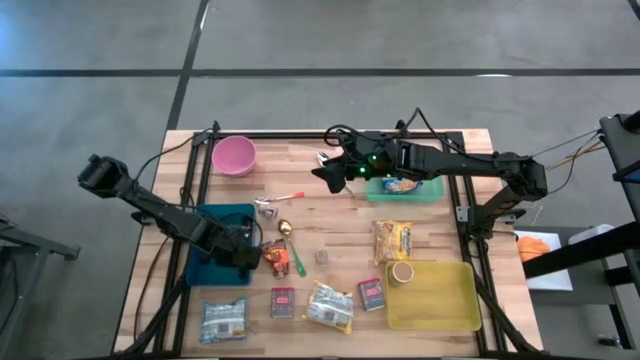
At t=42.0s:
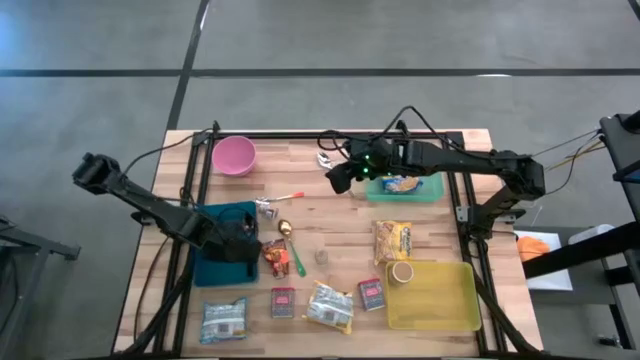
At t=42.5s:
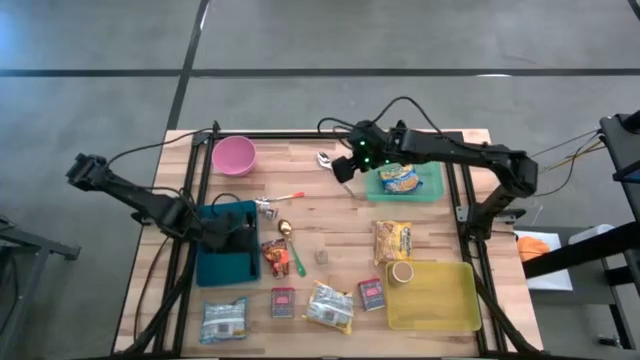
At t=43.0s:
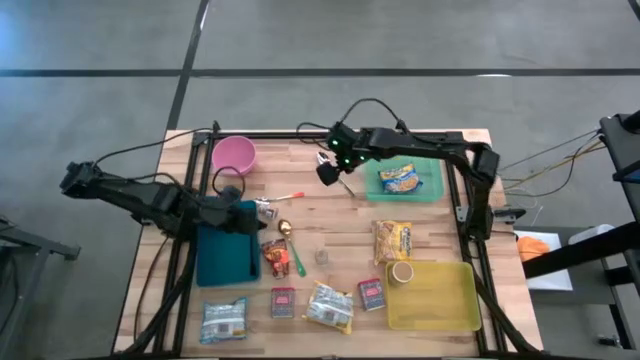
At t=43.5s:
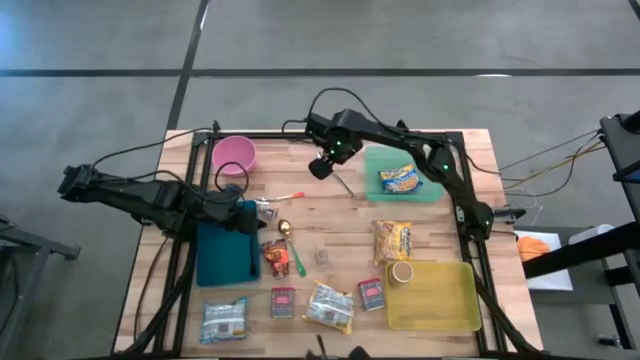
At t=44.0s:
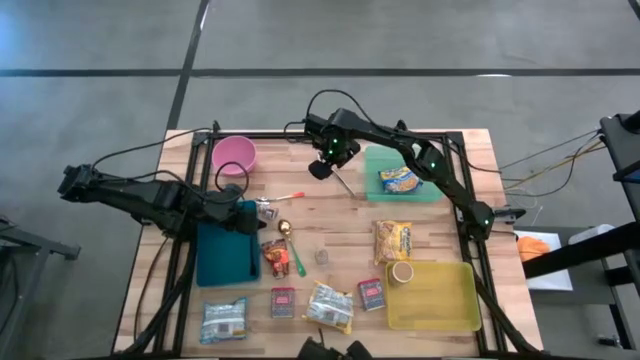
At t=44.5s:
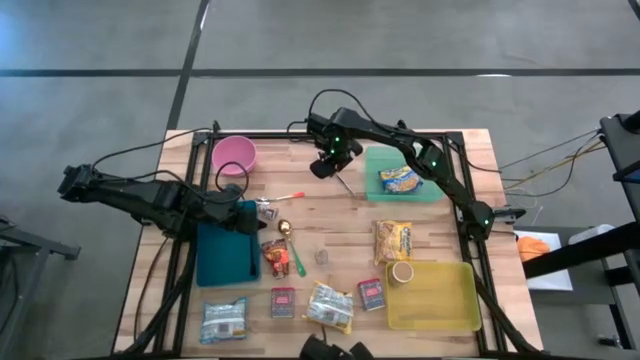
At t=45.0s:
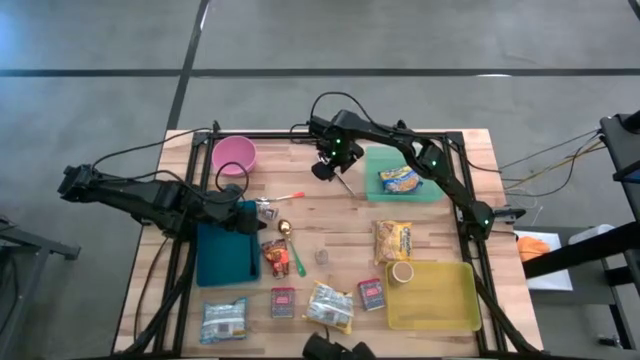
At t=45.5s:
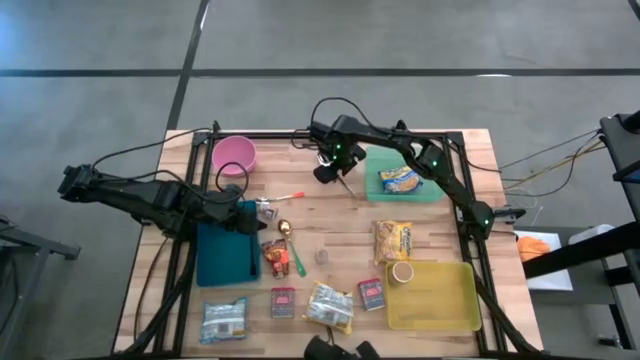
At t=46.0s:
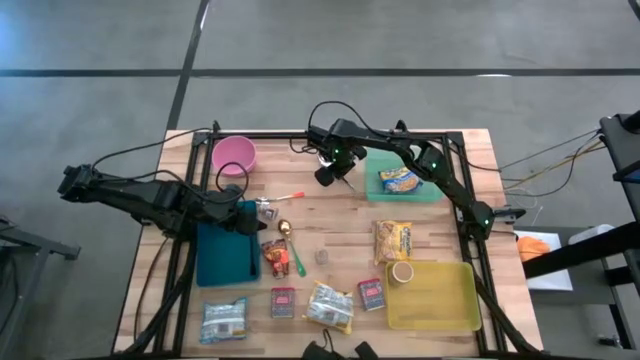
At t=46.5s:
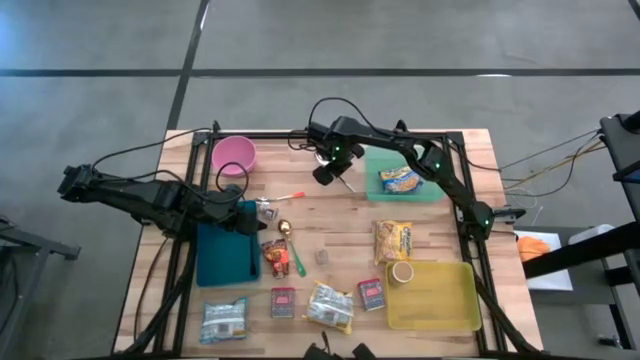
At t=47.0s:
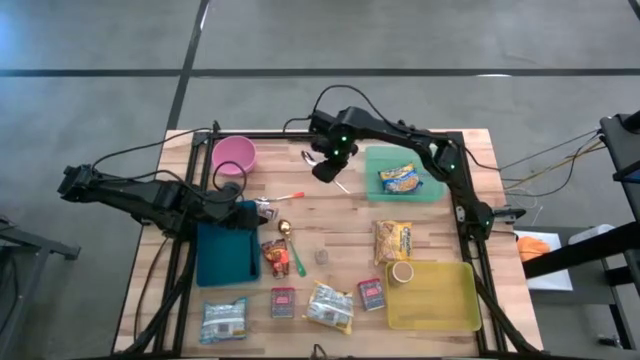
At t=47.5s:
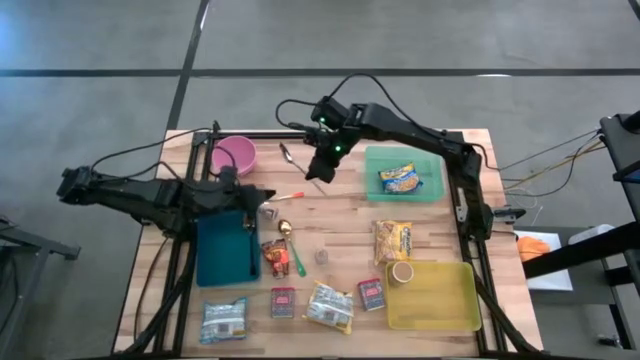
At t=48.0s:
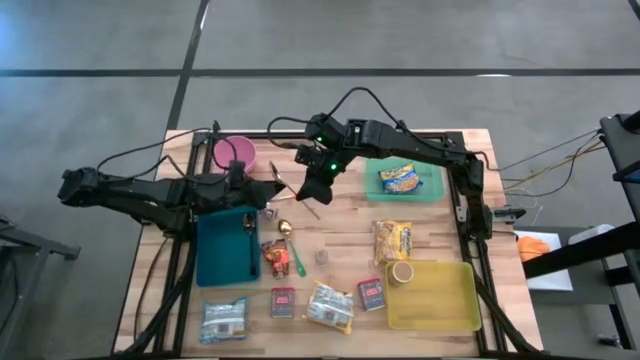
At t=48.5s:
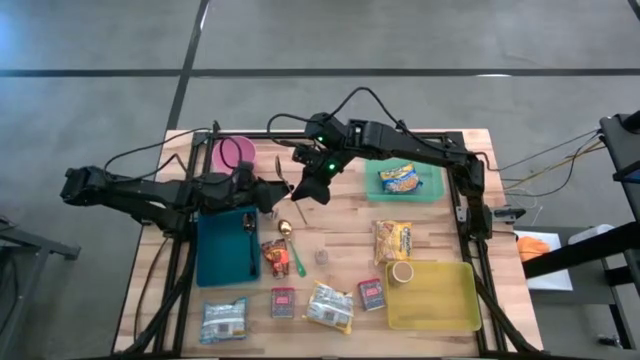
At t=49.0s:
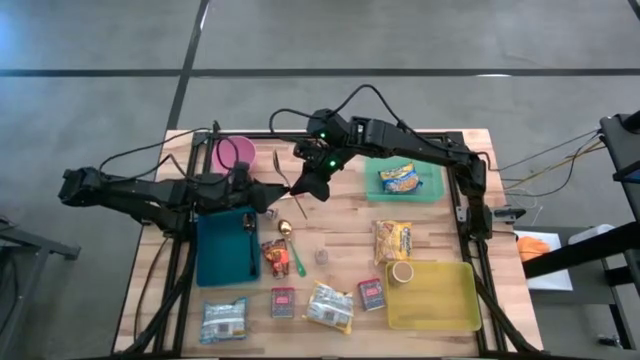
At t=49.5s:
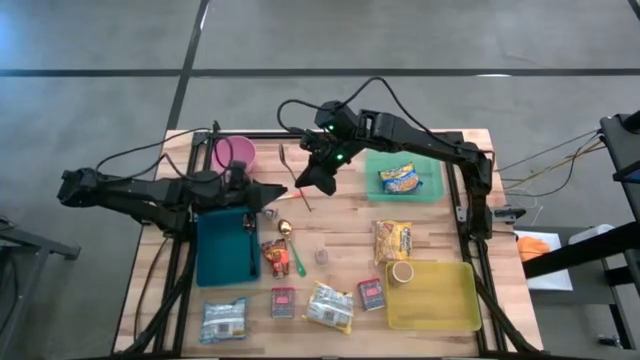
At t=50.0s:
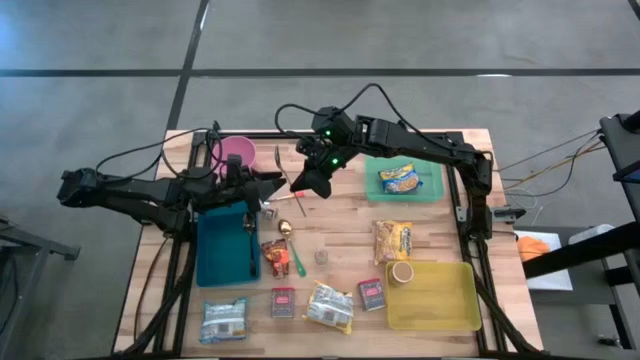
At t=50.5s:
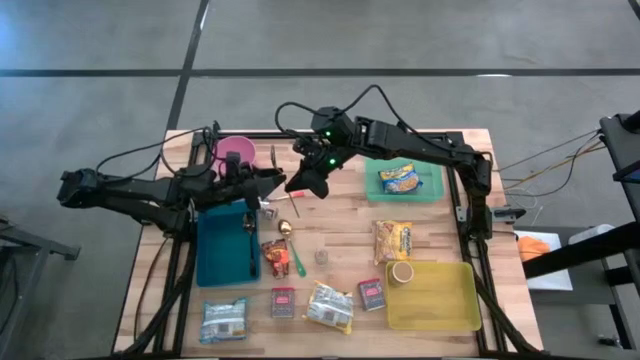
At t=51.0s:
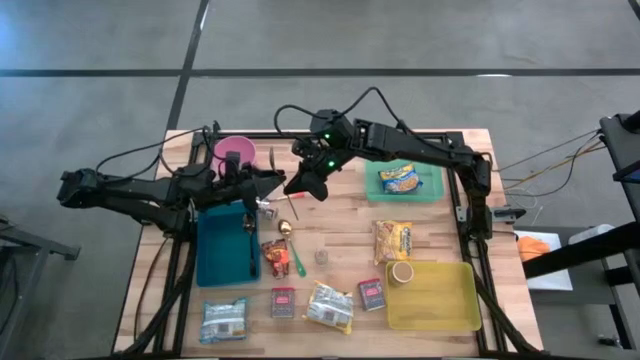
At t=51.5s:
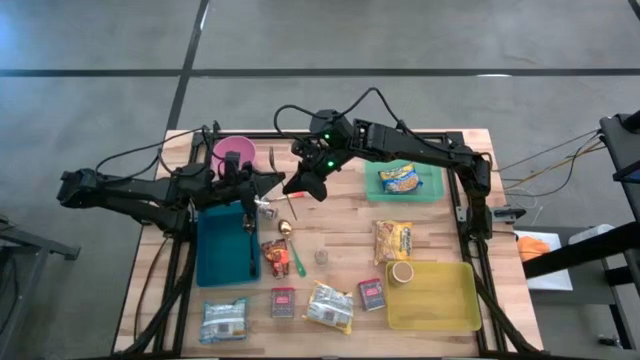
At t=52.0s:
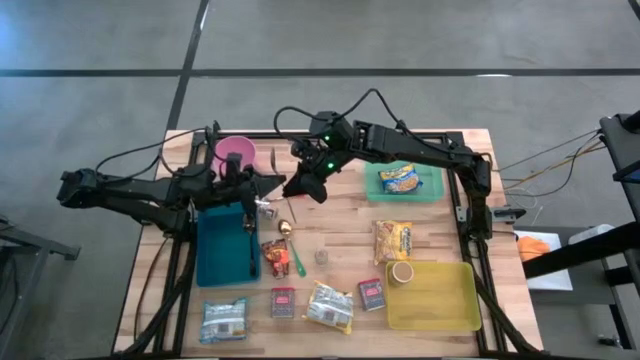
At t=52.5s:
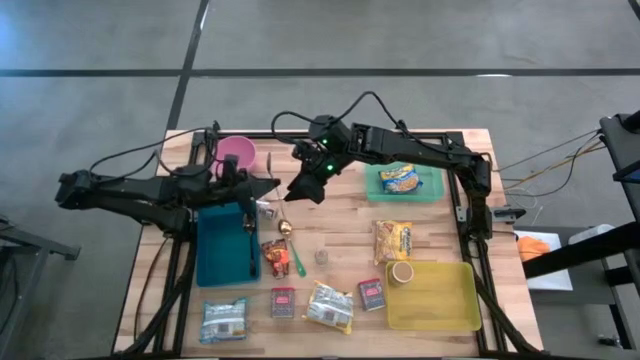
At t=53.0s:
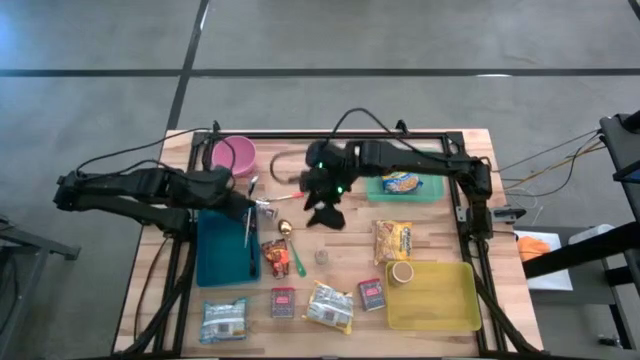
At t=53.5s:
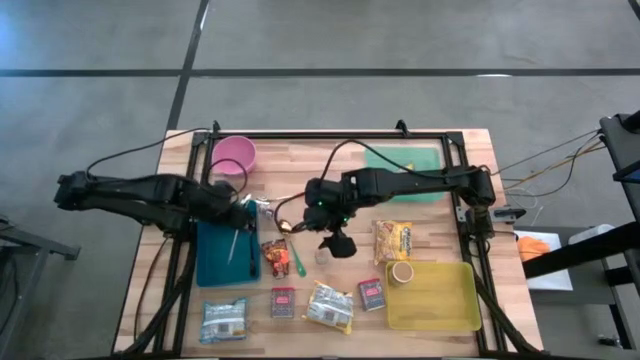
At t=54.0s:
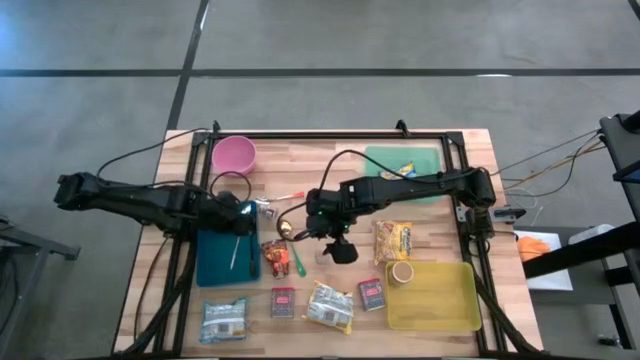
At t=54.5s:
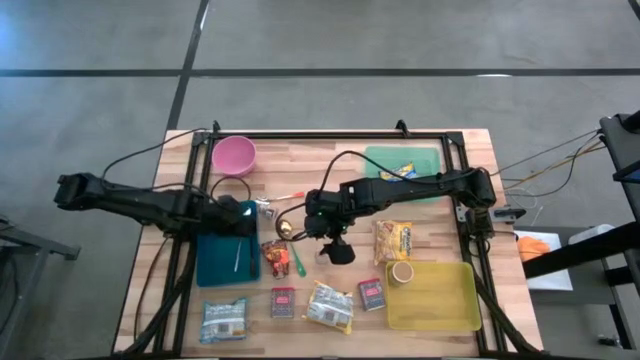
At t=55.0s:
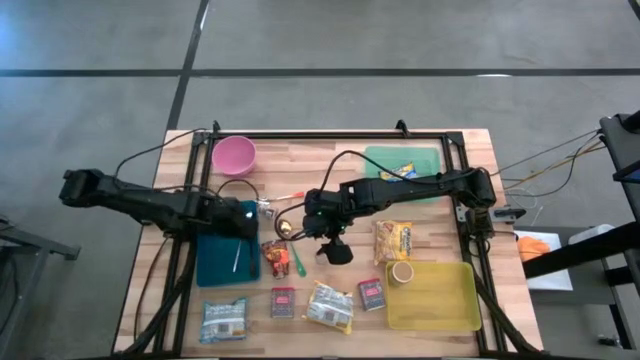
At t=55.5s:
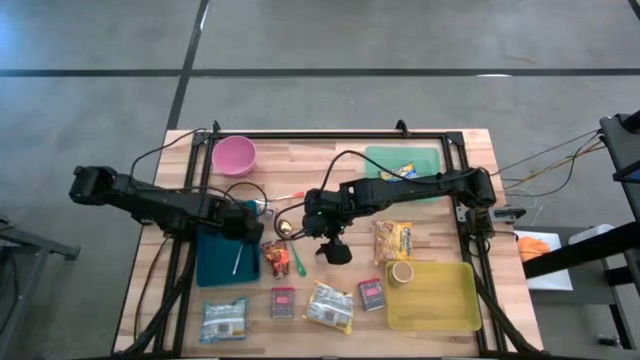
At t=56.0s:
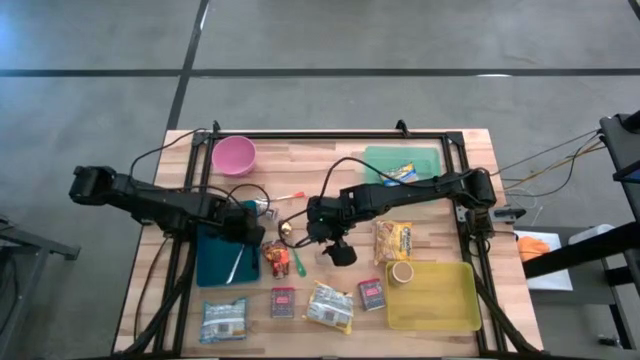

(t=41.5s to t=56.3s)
Put the silver spoon into the blue bin

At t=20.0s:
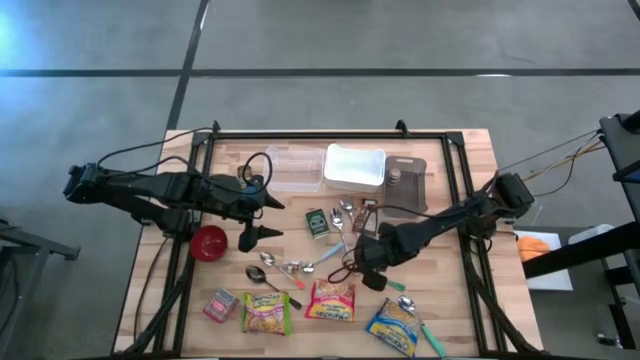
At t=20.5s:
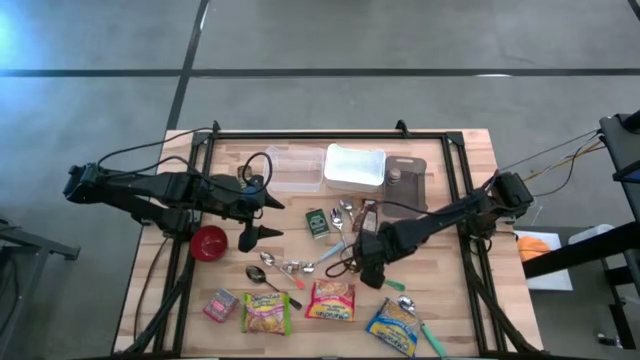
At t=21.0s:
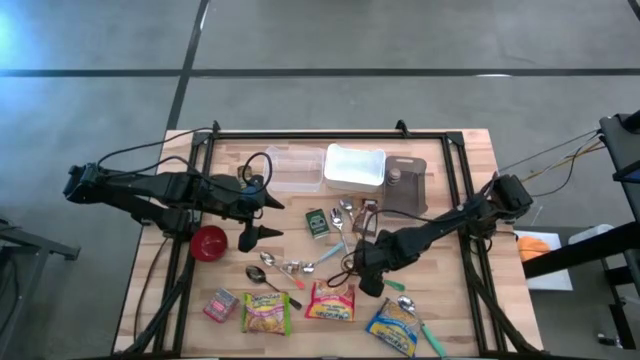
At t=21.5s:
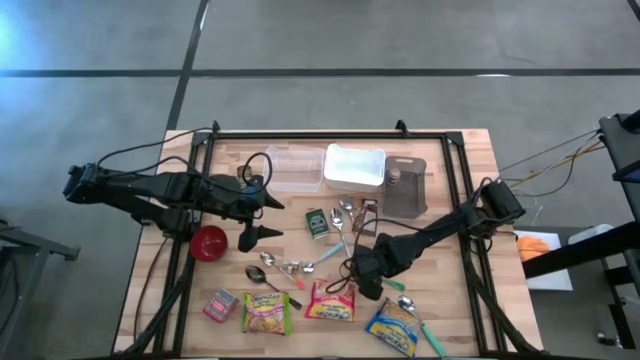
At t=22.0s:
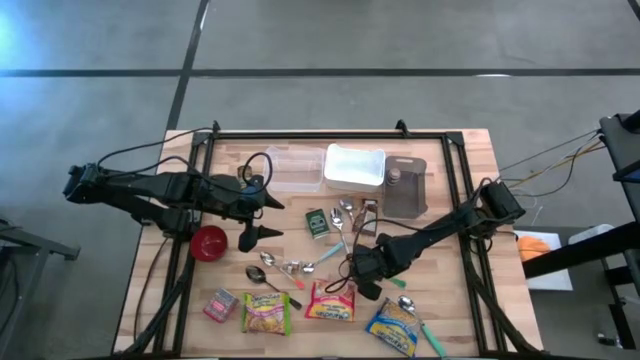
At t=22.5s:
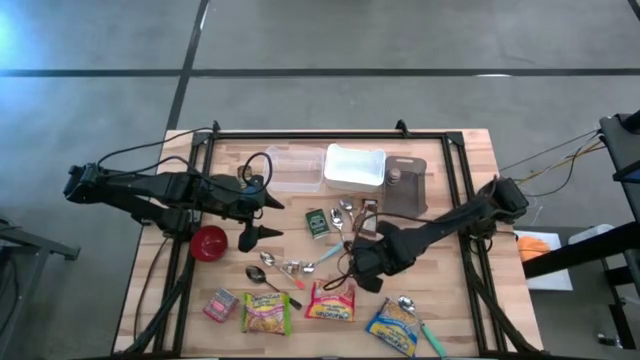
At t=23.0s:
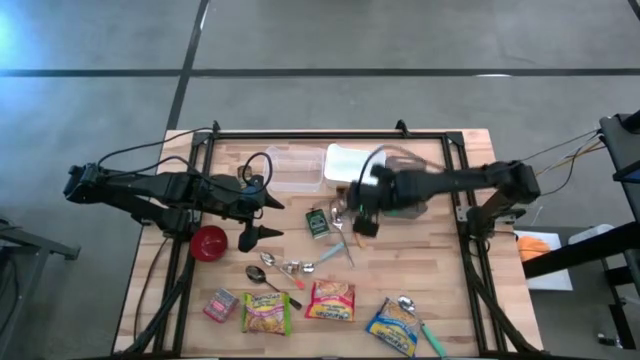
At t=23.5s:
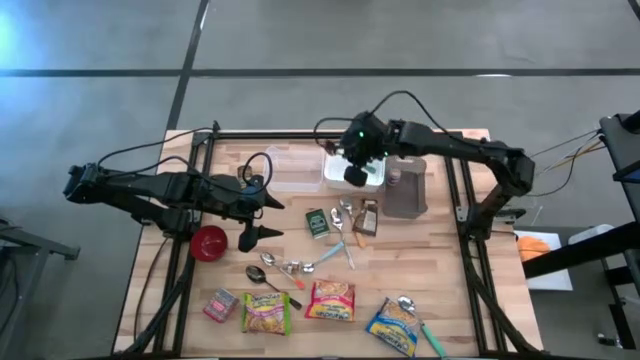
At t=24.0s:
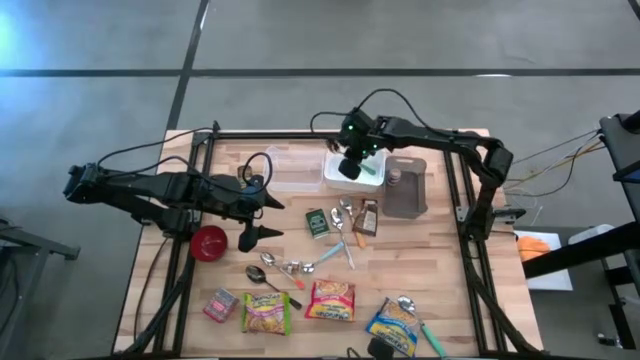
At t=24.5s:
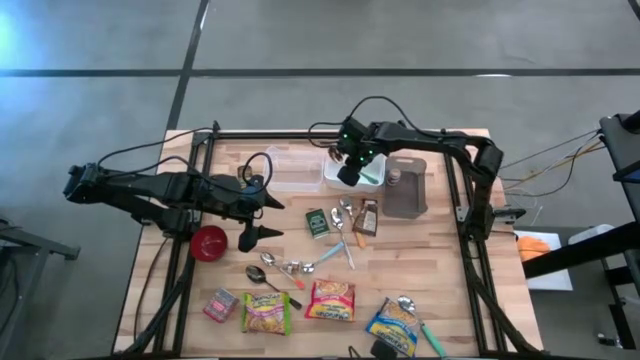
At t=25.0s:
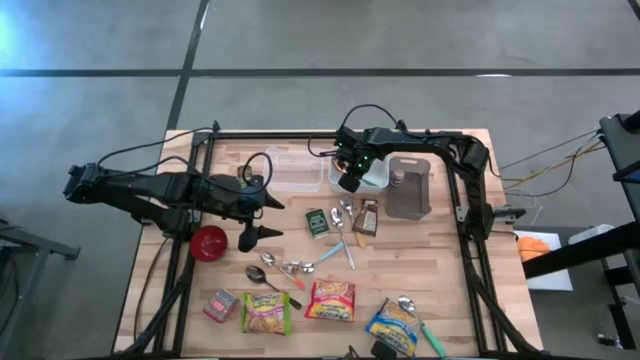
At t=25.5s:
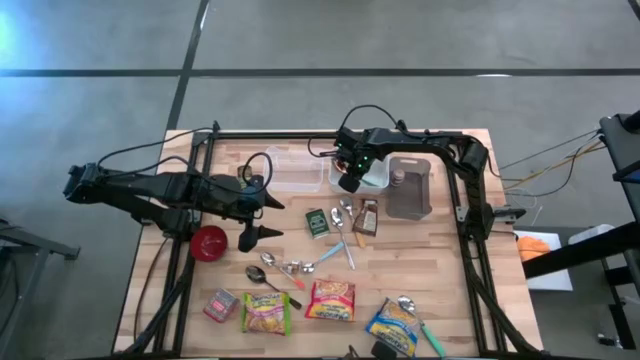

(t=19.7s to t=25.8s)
Put the green spoon into the white bin
